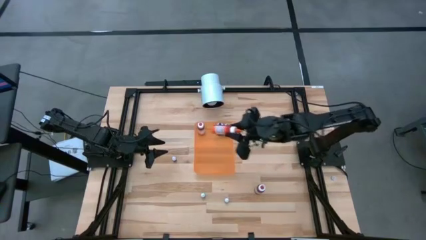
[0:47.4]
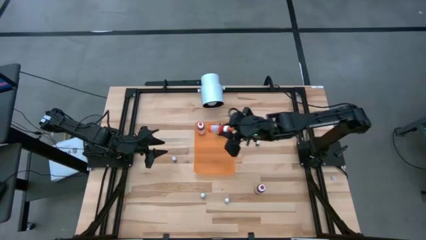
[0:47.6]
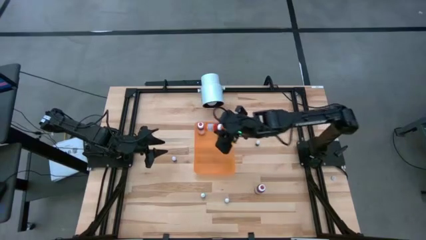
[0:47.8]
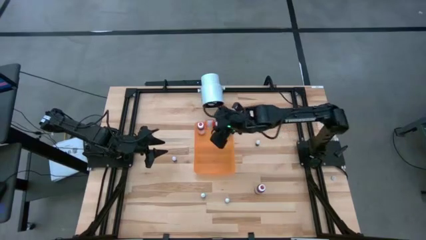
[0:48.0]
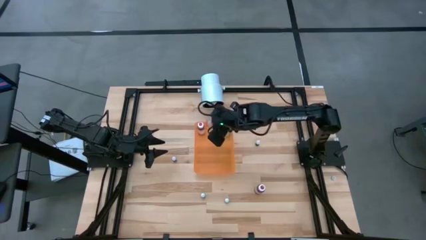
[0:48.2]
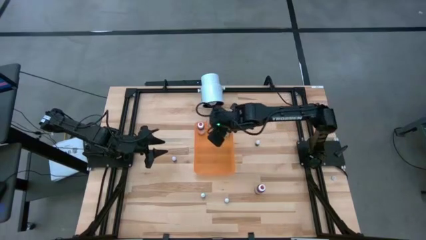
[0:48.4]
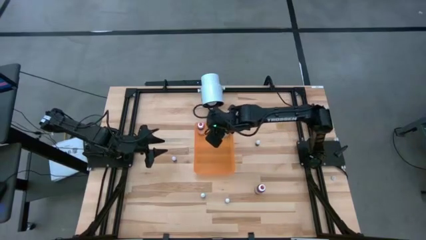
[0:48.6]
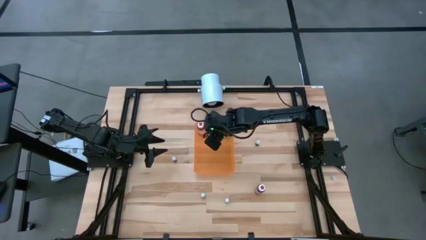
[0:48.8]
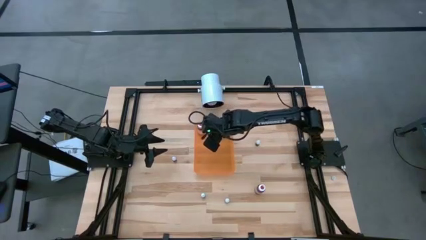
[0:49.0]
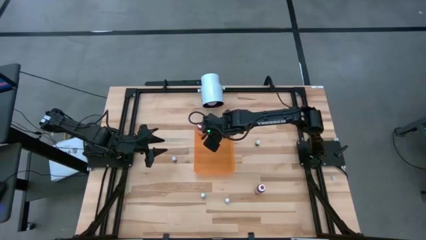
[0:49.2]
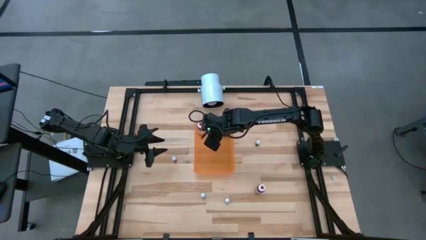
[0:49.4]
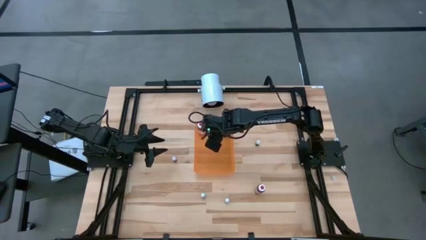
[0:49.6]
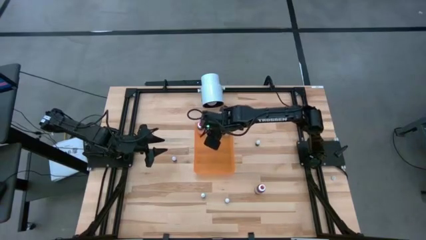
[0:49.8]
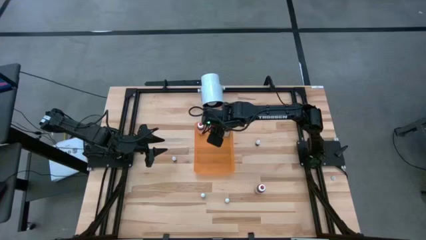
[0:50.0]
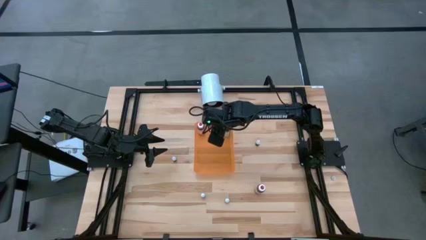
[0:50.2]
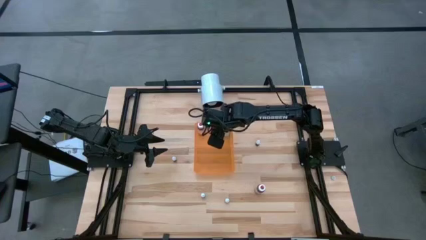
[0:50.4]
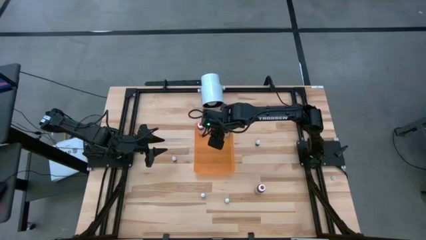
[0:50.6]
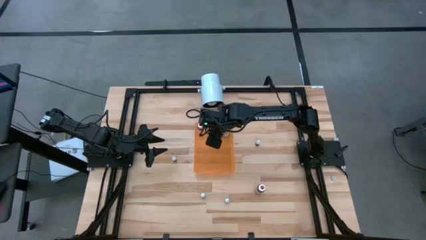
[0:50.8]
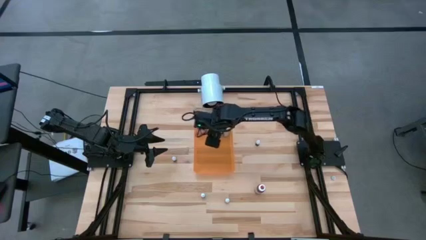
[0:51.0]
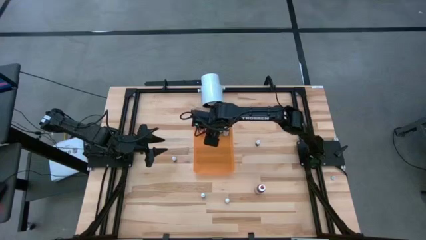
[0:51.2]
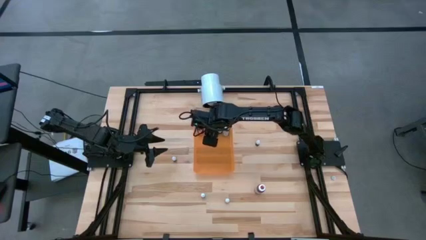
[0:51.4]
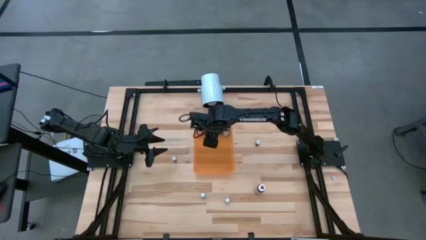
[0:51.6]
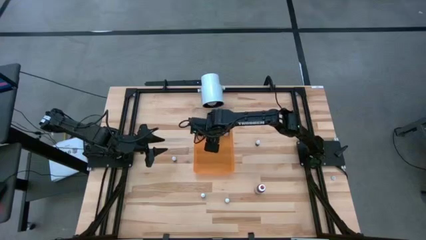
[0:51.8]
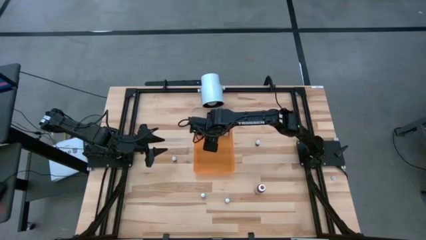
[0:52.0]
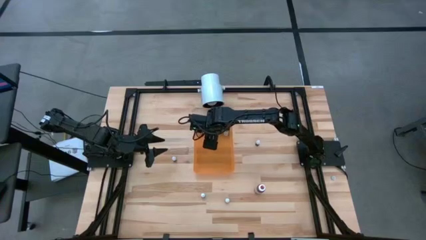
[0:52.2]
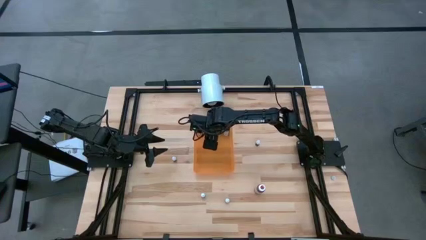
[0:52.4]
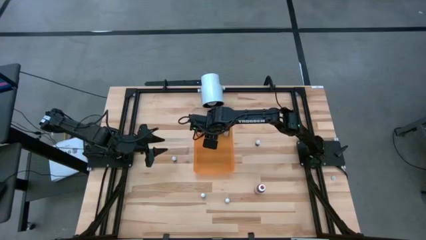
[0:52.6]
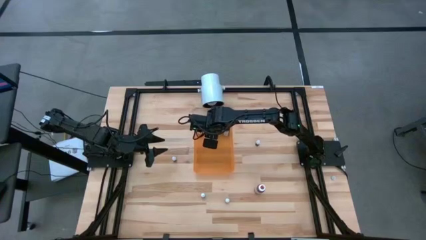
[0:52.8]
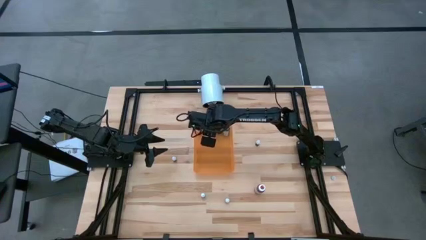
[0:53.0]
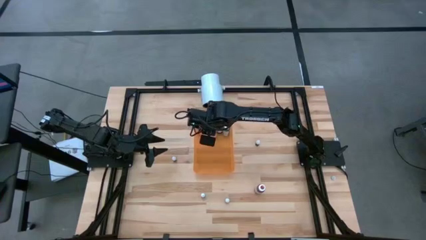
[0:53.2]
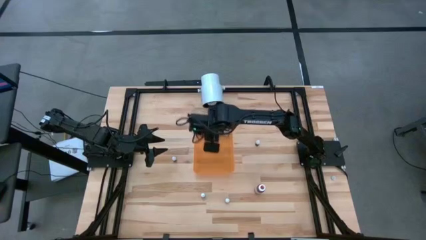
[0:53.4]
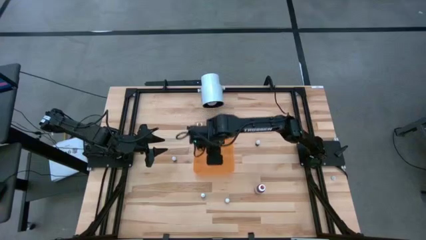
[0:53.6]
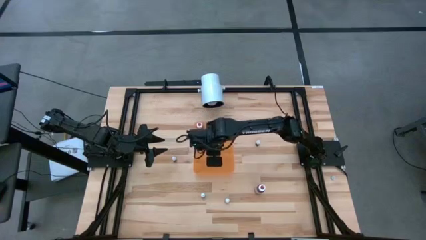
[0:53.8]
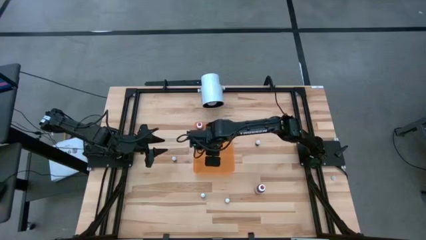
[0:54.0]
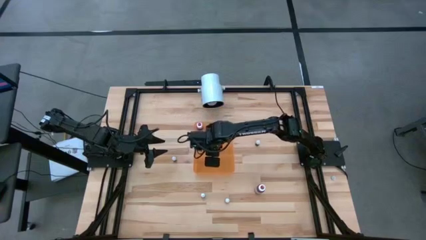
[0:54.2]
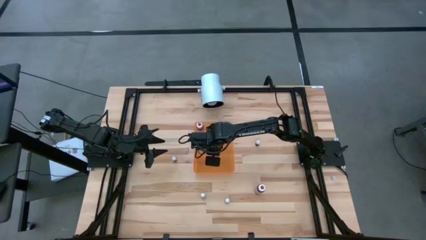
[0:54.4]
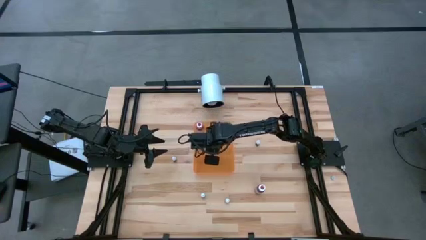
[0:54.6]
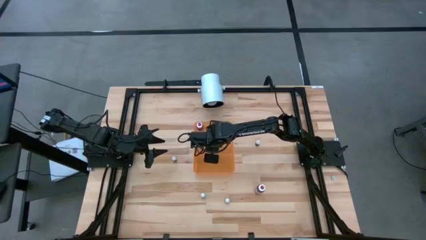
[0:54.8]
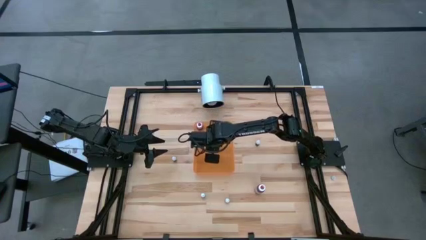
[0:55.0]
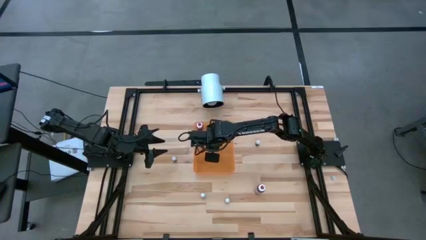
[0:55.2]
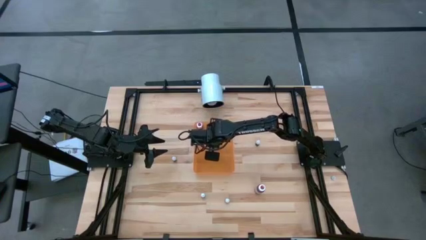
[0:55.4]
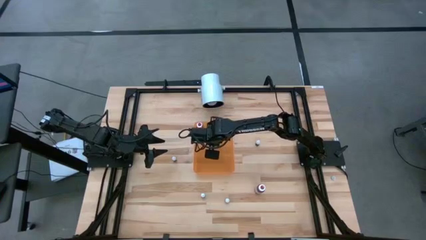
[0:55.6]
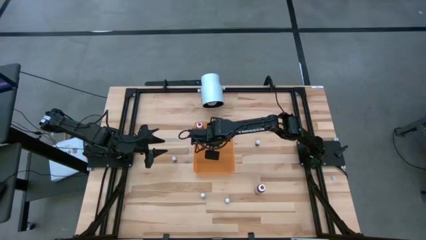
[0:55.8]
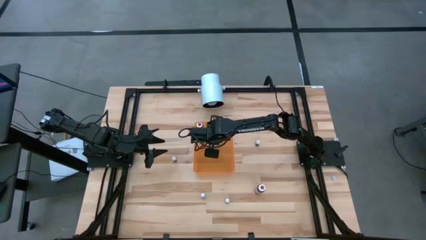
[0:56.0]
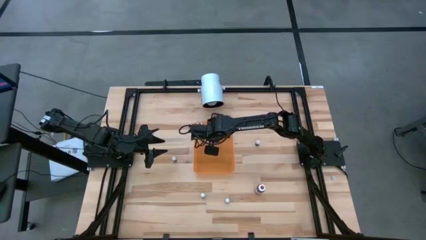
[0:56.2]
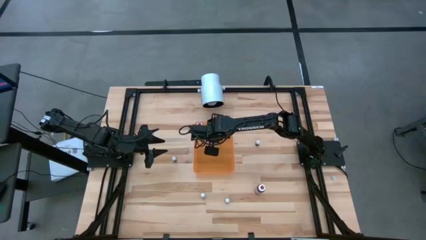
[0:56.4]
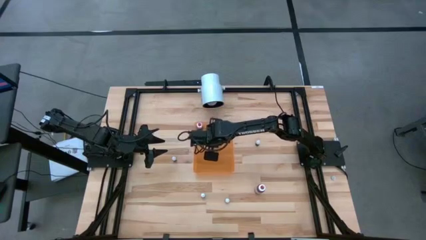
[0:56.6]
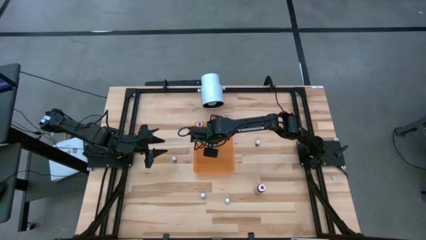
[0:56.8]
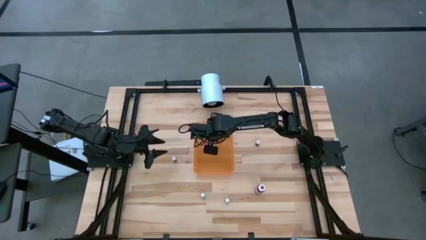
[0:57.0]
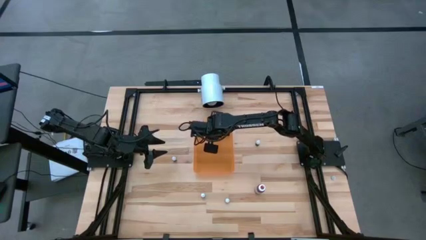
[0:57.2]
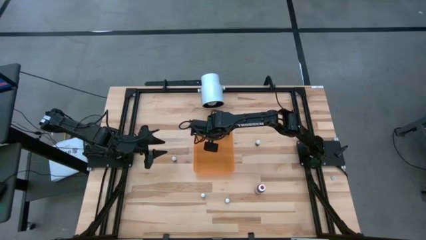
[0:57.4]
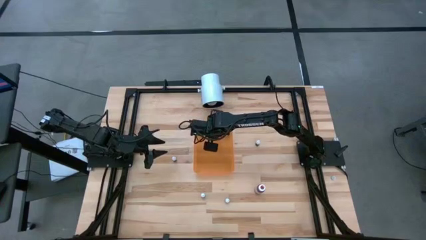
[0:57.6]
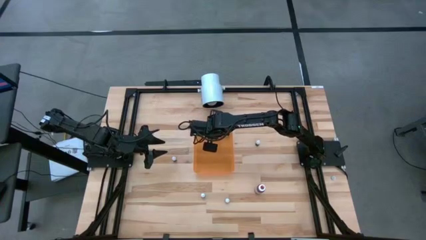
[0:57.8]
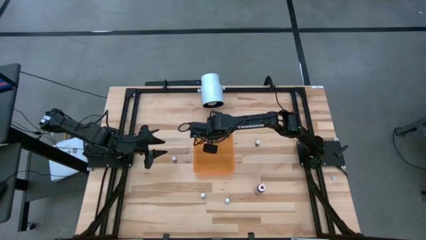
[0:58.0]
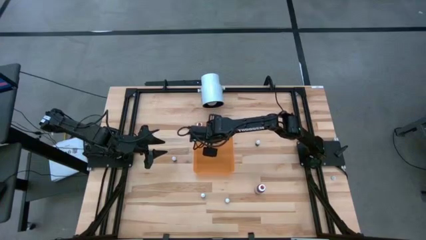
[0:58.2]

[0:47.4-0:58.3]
Task: Pick & Place food coloring
Put the large orange food coloring bottle into the bin
